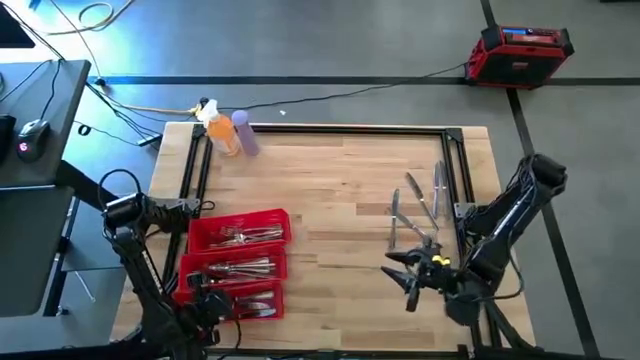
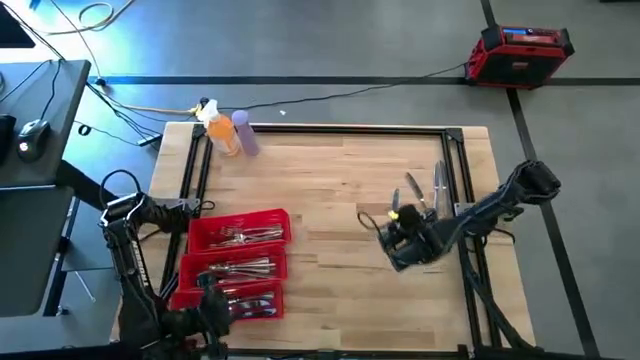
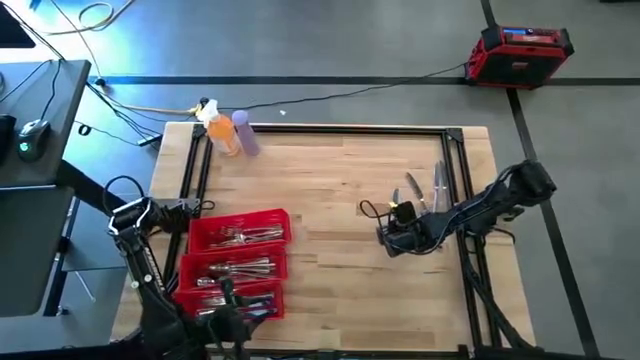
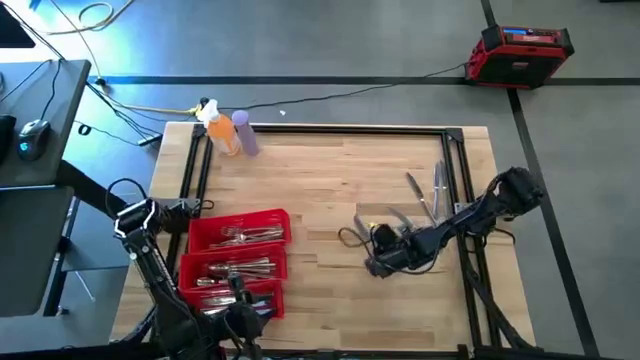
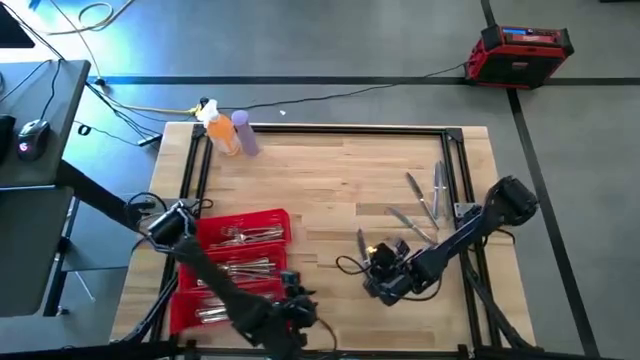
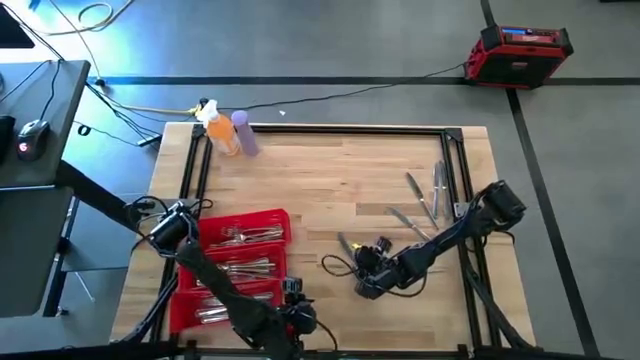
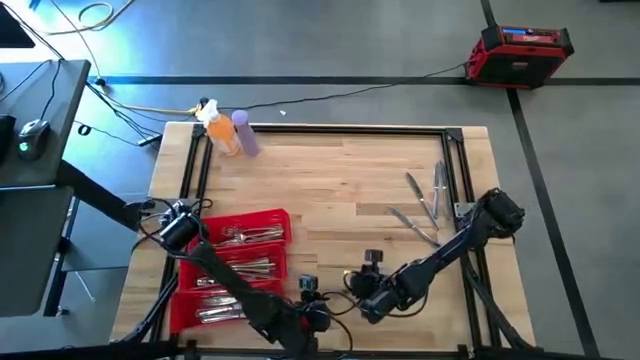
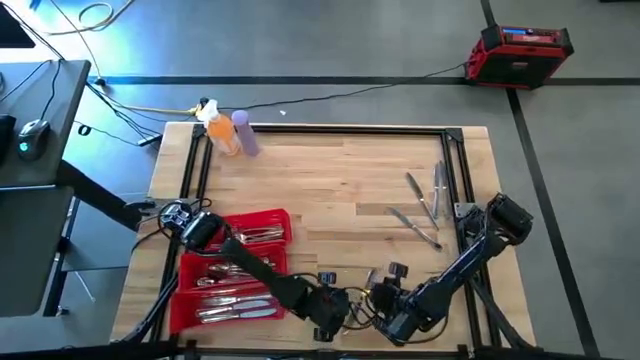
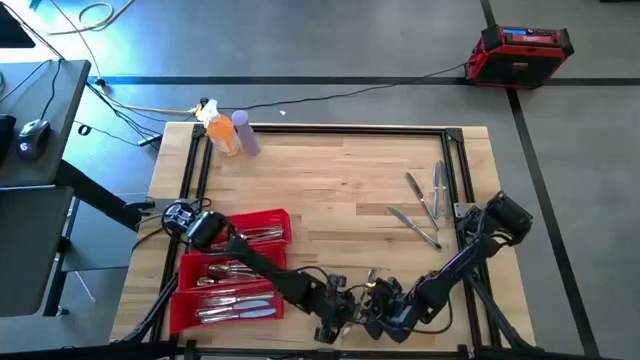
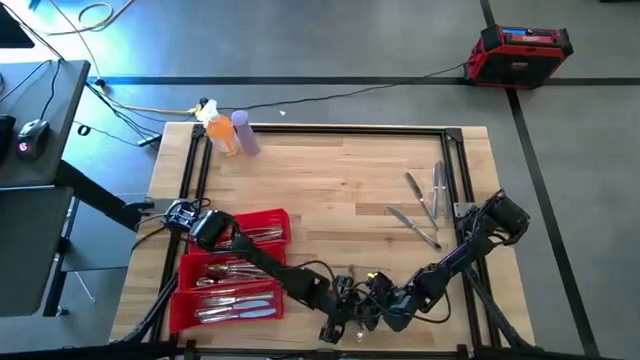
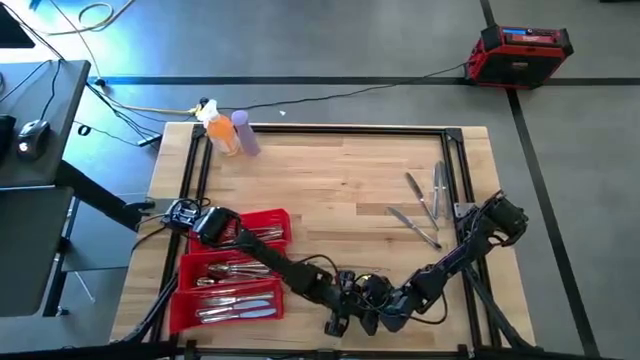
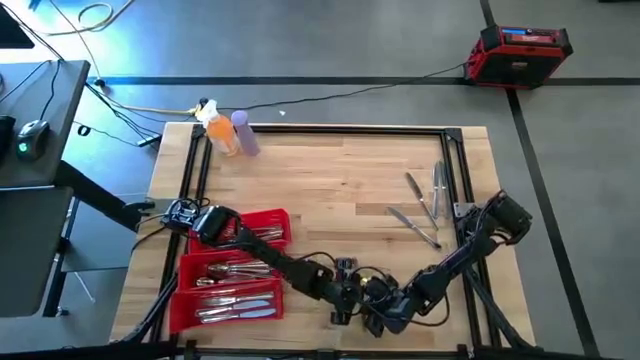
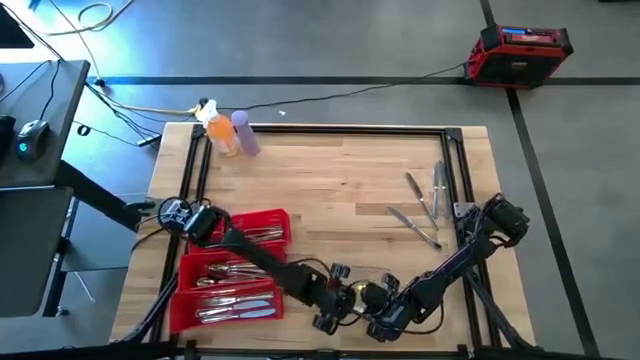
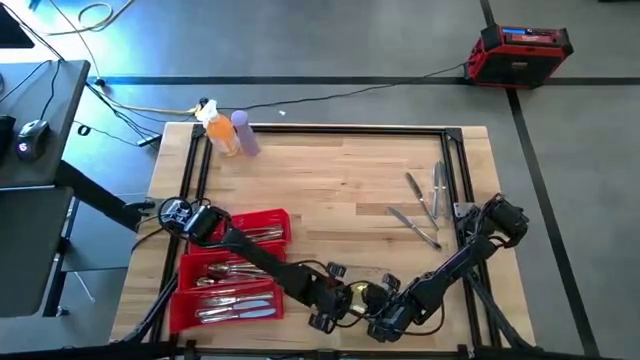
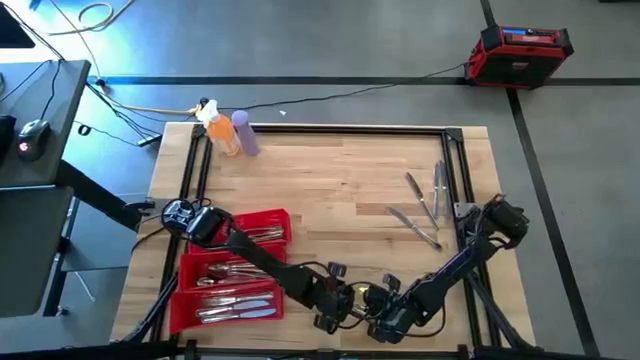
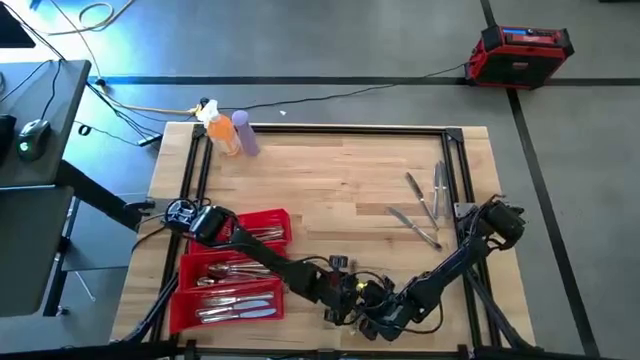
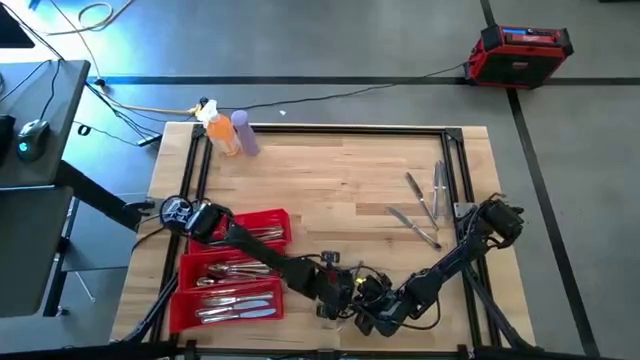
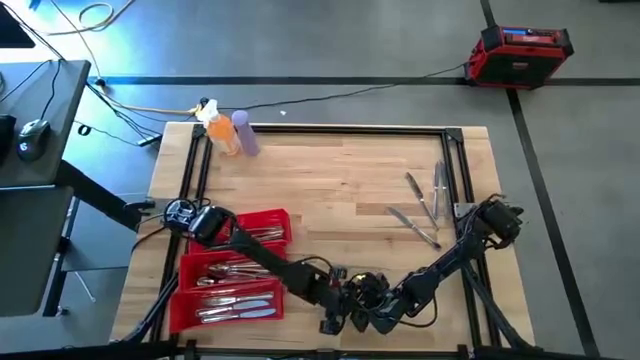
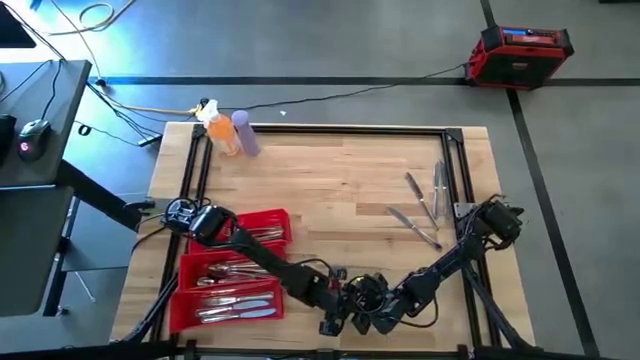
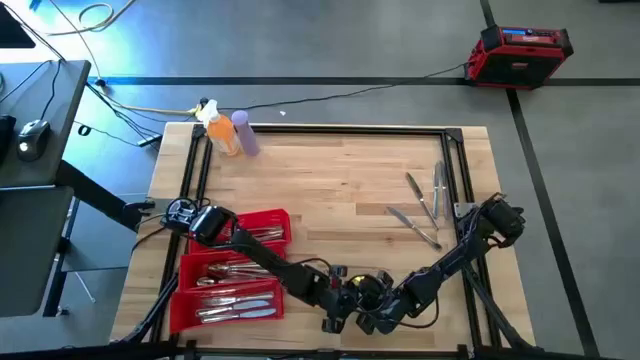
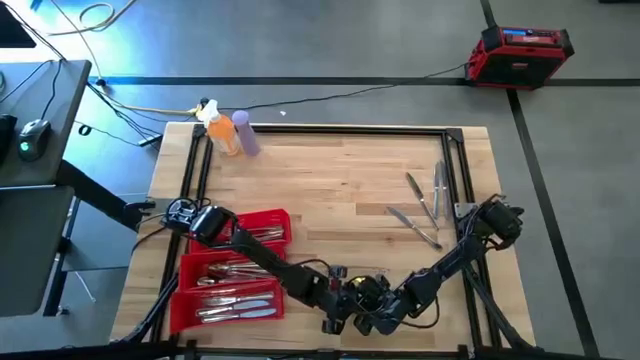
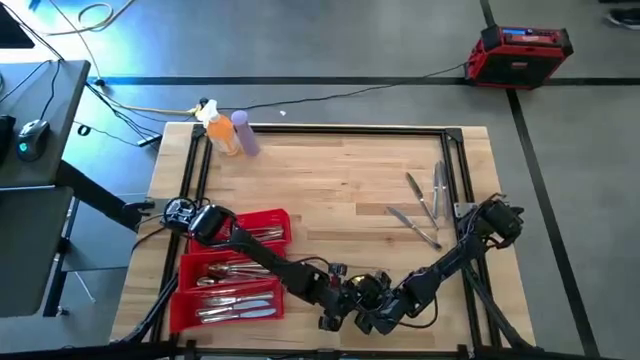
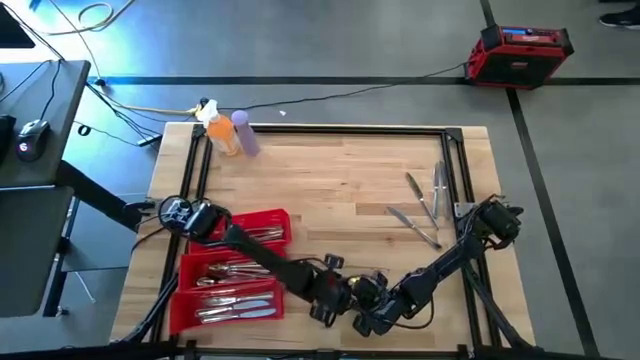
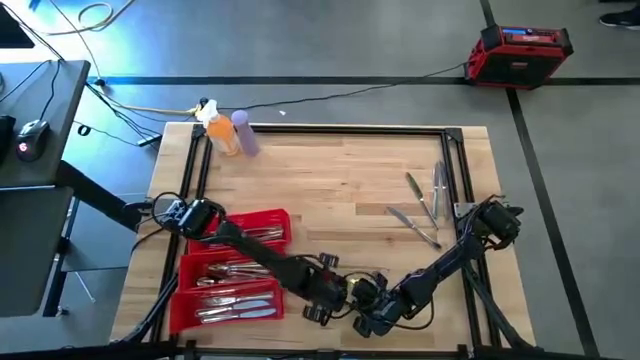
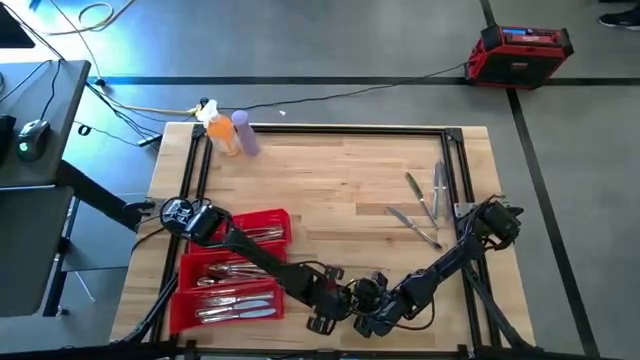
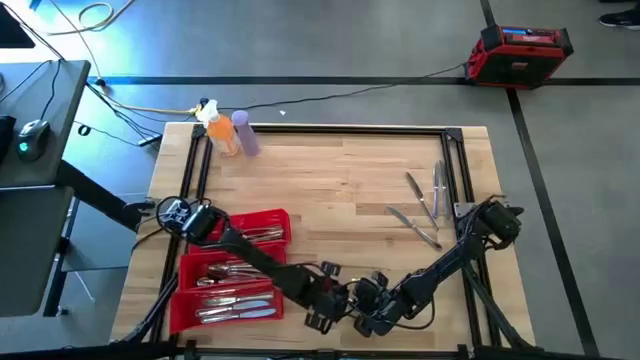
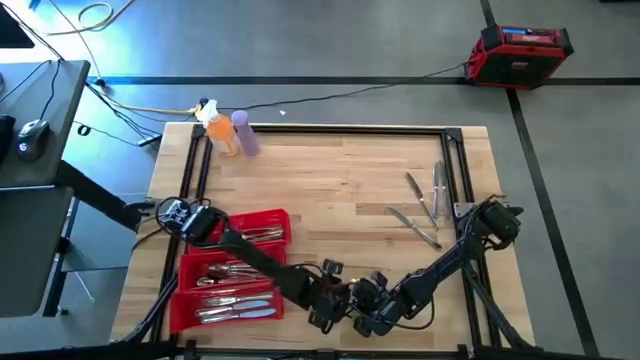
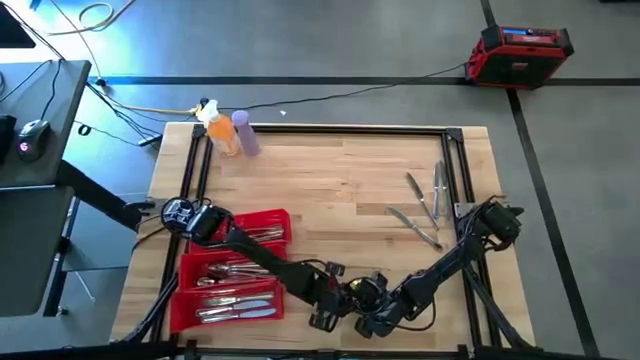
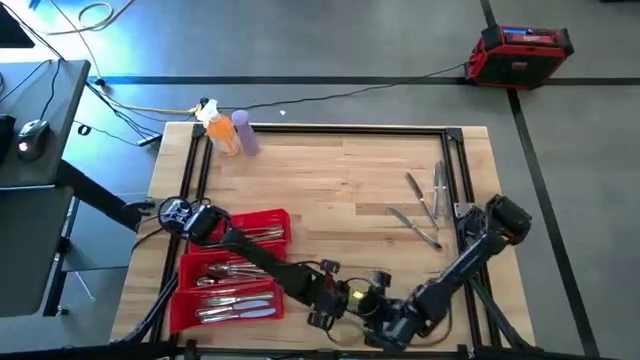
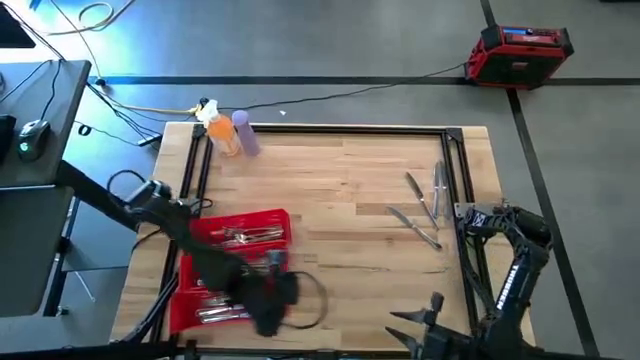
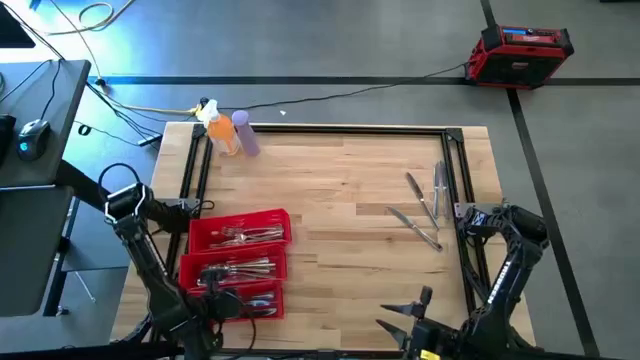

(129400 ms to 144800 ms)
Task: Sort silverware
Put the silver knife in the bottom red bin

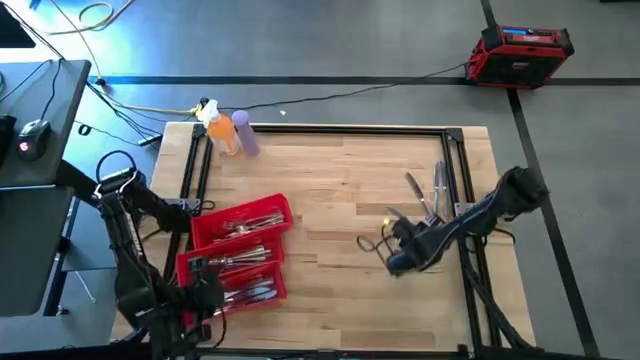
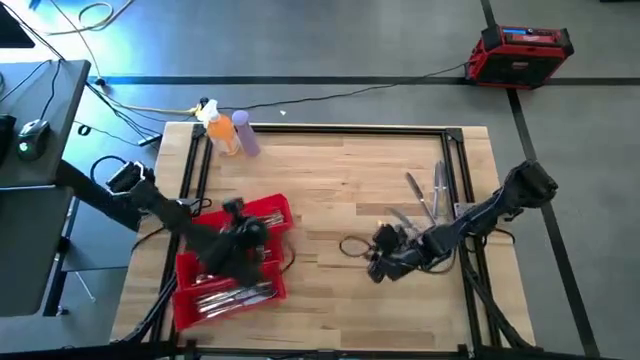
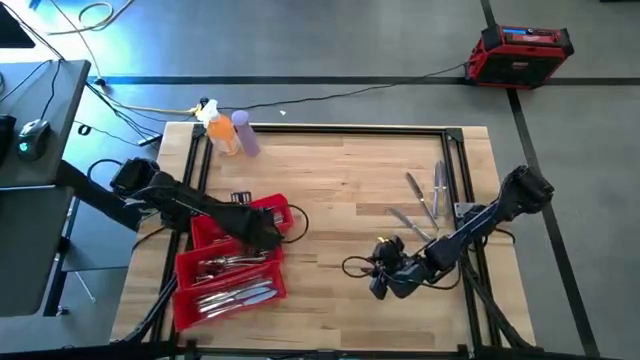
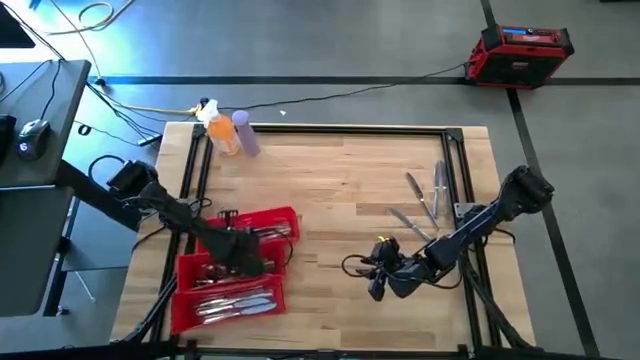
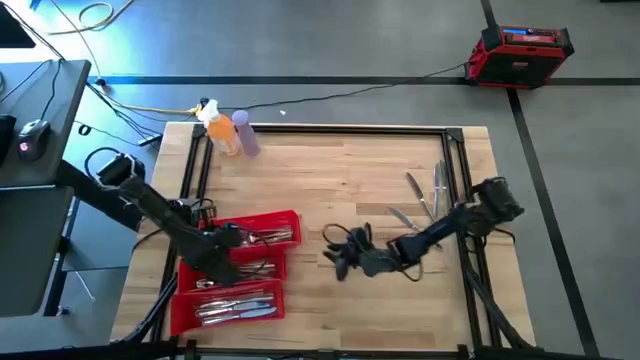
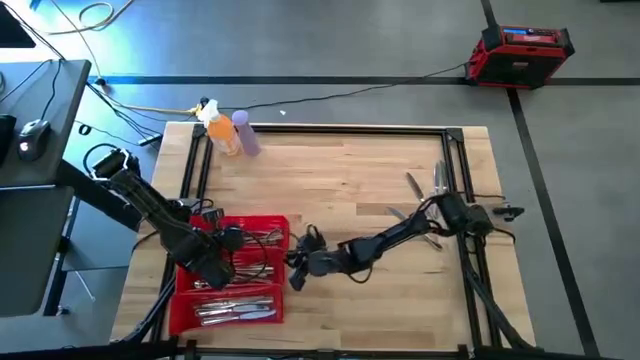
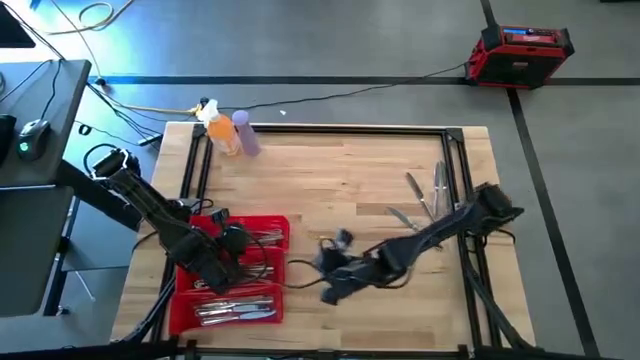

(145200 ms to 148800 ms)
Adjust the top red bin

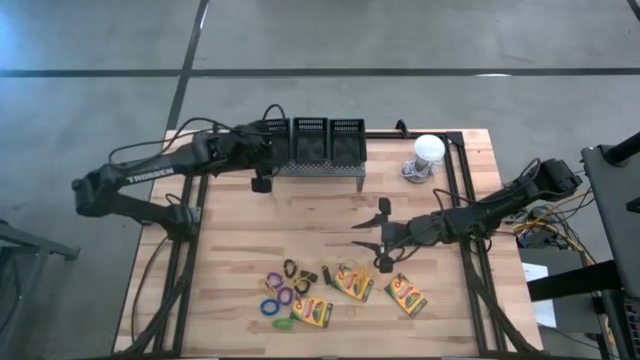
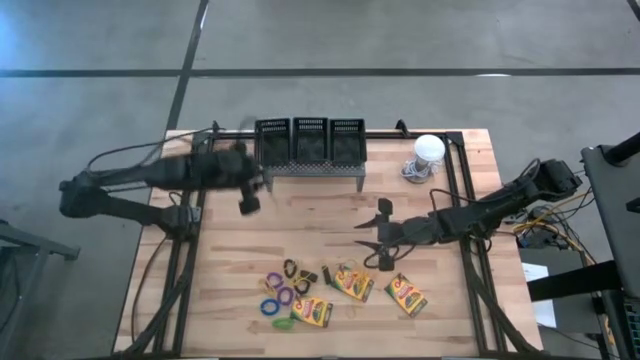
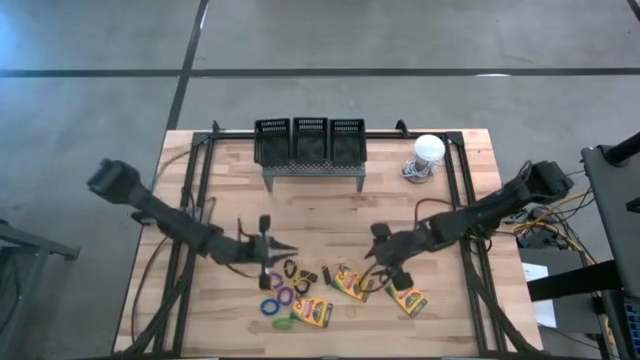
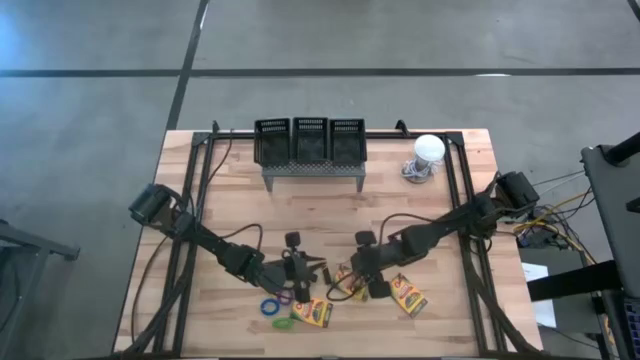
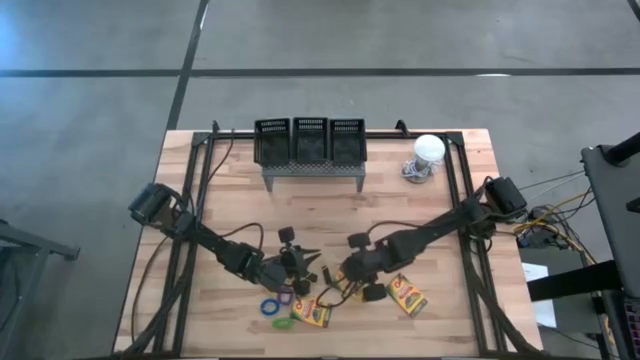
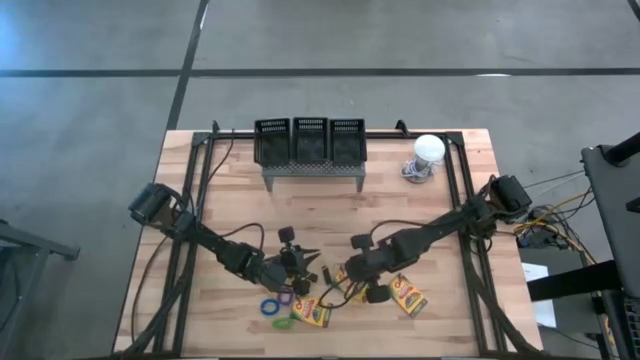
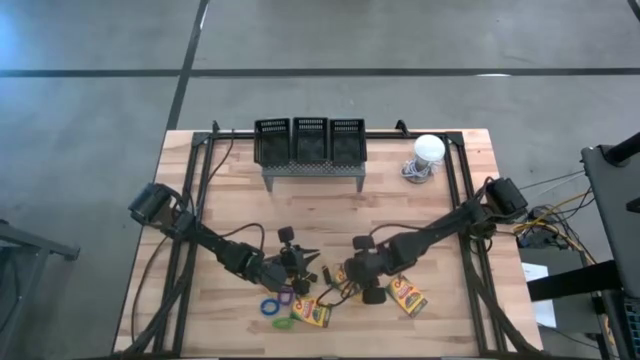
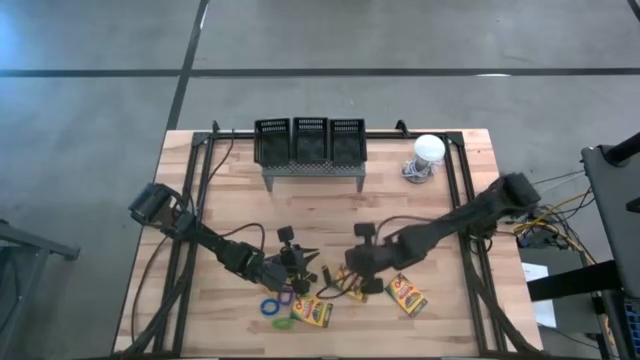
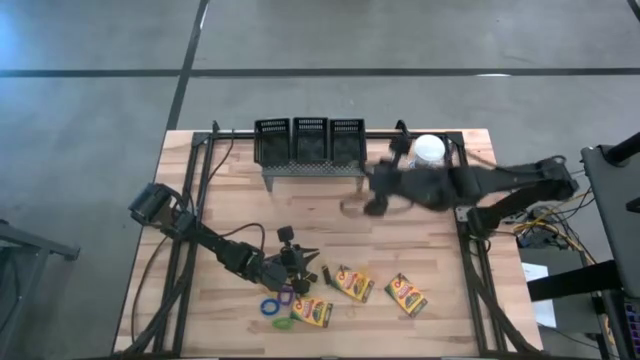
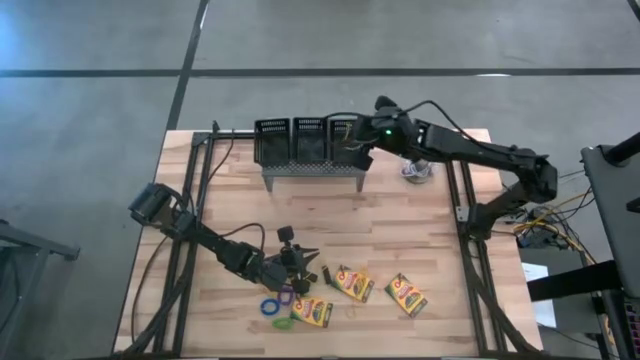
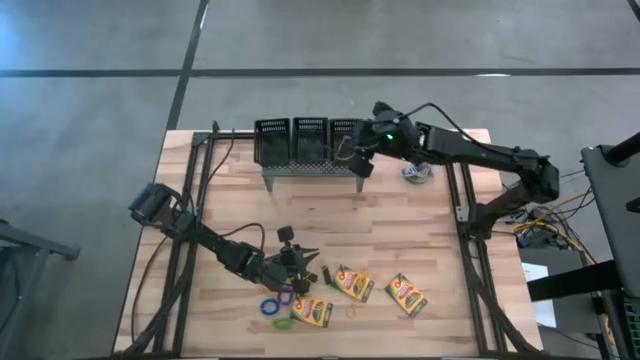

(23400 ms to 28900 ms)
Task: Pick & Place Office Desk Supplies
Put the yellow rubber band into the right black basket on the shelf
